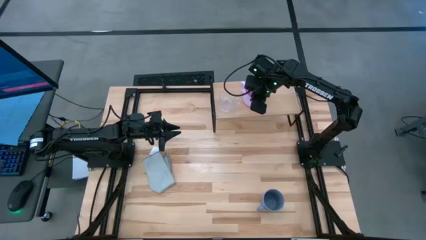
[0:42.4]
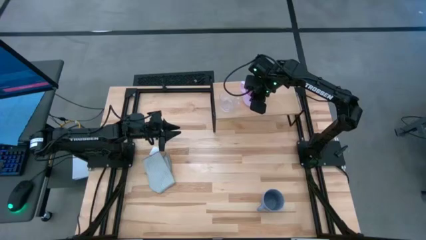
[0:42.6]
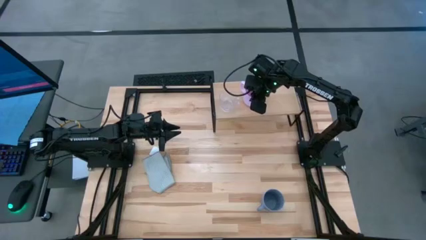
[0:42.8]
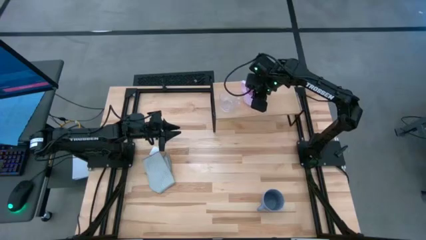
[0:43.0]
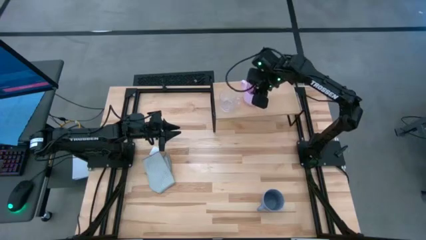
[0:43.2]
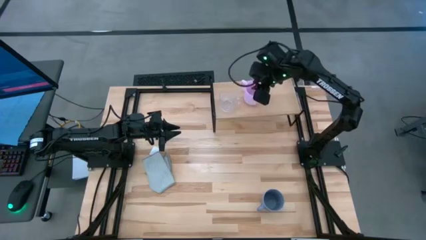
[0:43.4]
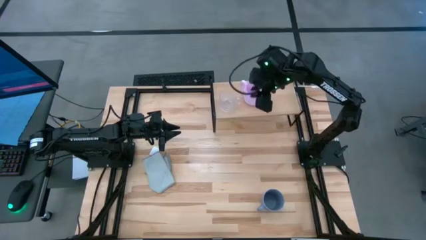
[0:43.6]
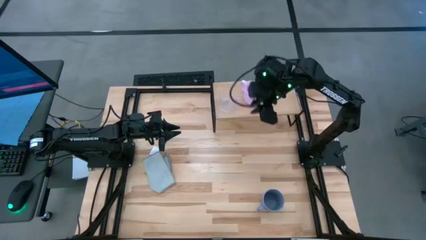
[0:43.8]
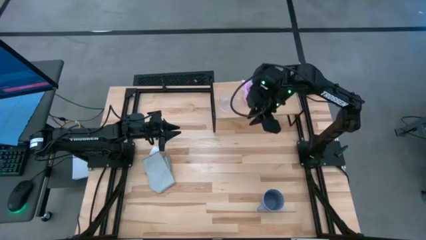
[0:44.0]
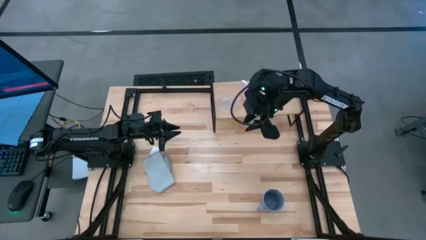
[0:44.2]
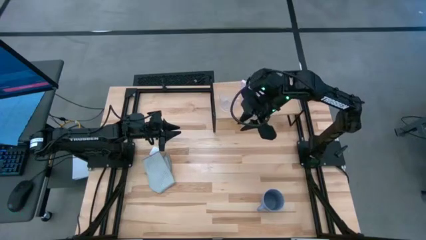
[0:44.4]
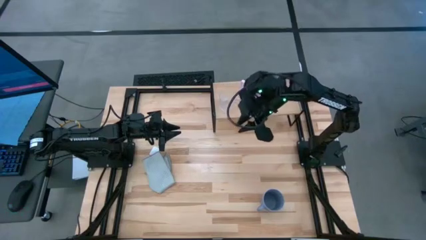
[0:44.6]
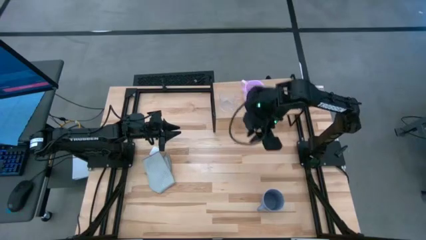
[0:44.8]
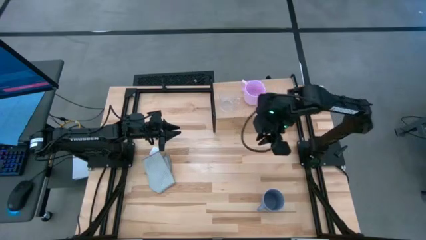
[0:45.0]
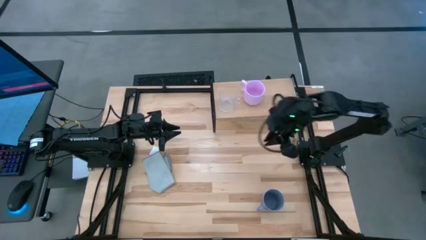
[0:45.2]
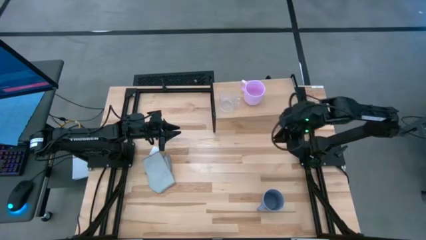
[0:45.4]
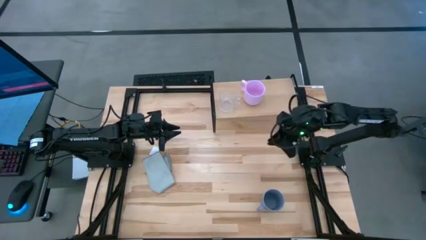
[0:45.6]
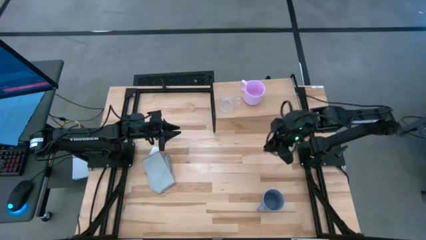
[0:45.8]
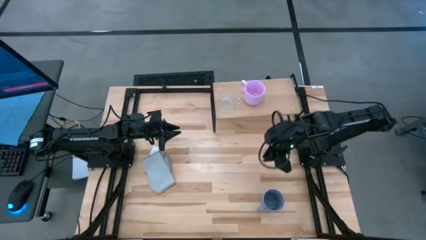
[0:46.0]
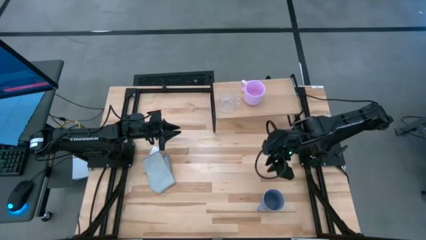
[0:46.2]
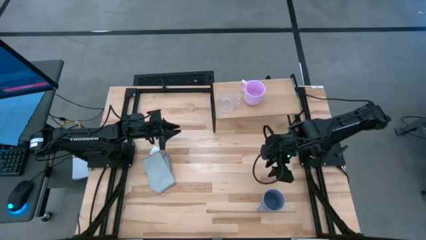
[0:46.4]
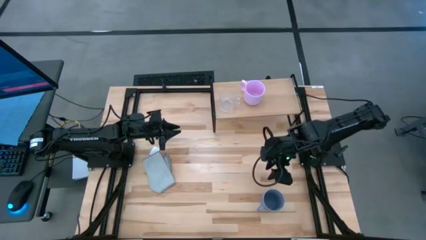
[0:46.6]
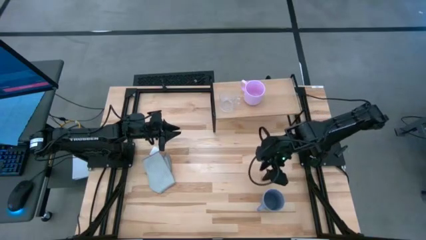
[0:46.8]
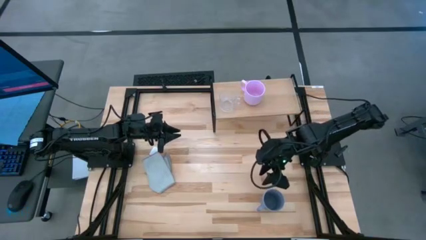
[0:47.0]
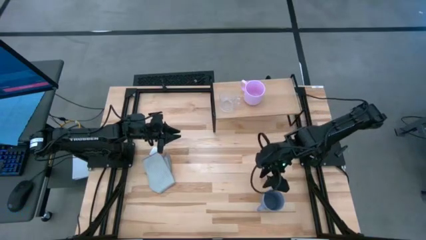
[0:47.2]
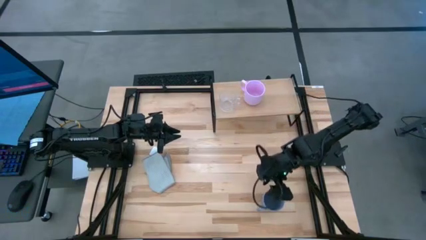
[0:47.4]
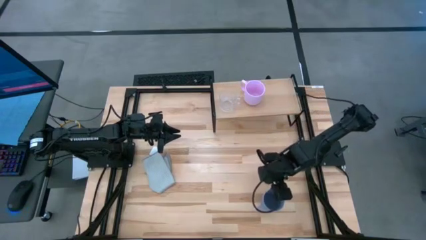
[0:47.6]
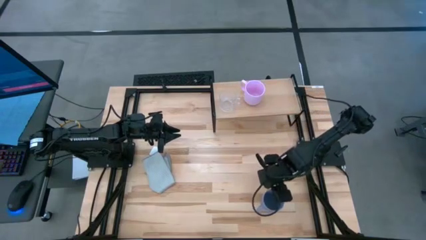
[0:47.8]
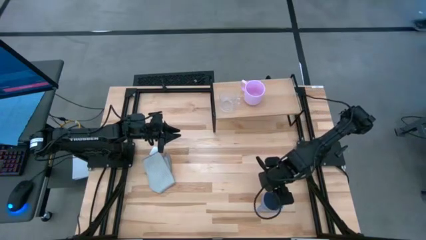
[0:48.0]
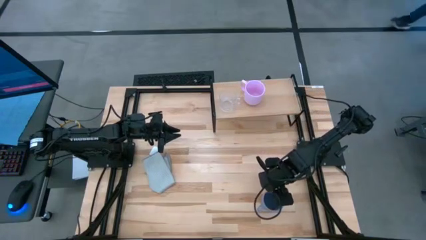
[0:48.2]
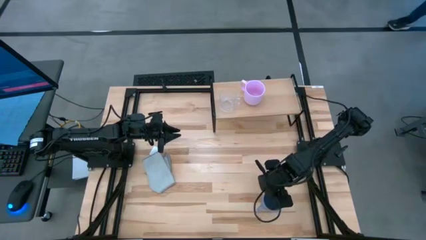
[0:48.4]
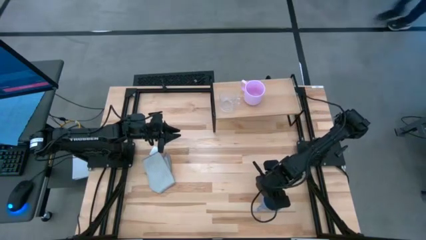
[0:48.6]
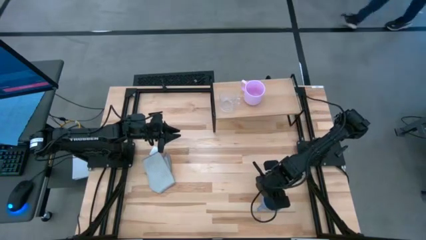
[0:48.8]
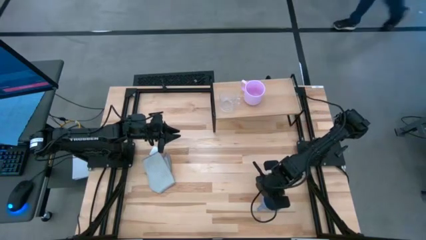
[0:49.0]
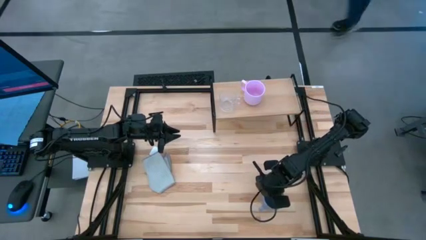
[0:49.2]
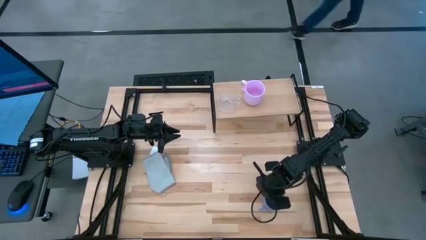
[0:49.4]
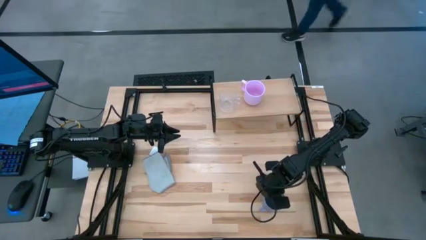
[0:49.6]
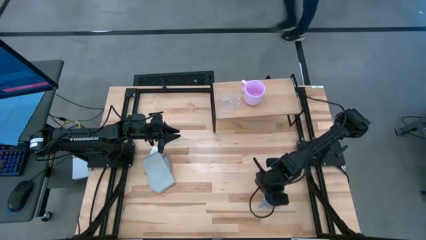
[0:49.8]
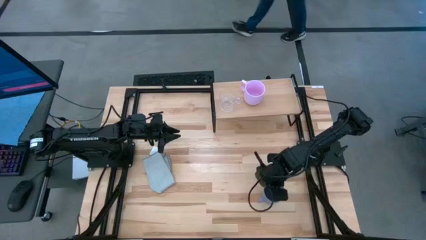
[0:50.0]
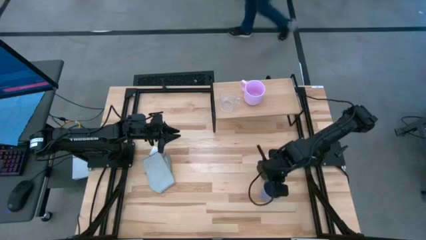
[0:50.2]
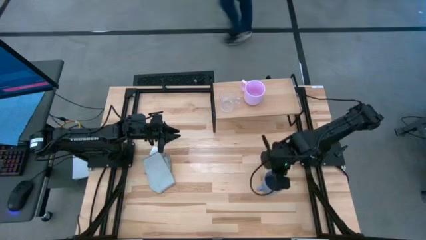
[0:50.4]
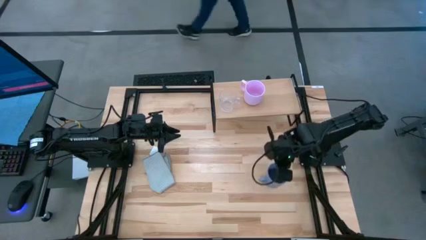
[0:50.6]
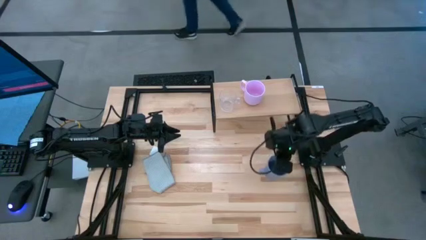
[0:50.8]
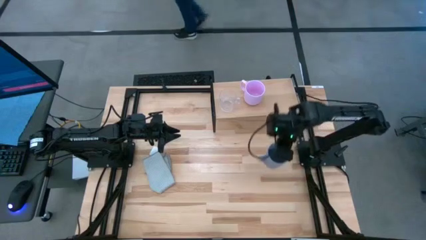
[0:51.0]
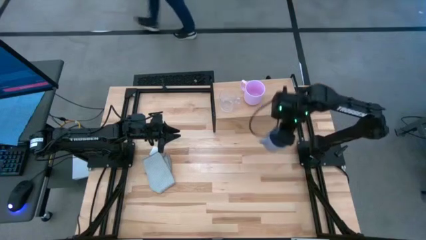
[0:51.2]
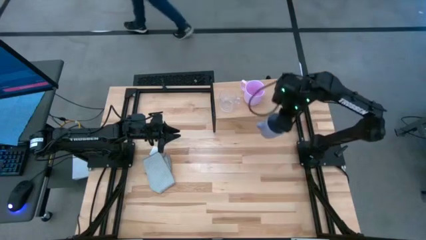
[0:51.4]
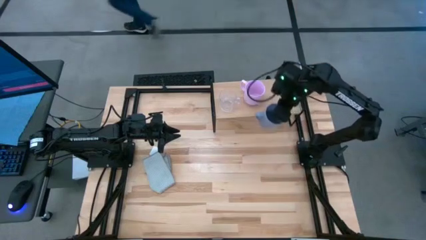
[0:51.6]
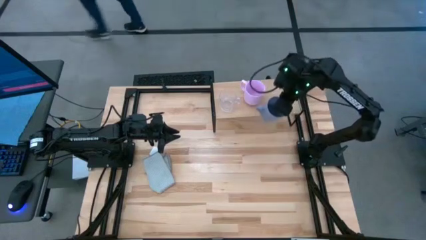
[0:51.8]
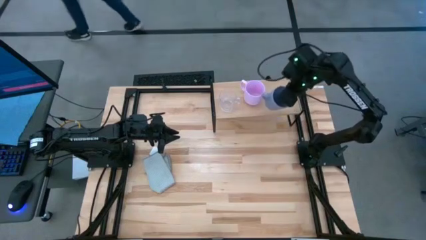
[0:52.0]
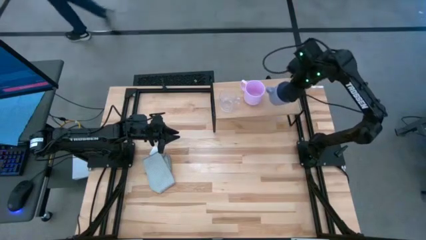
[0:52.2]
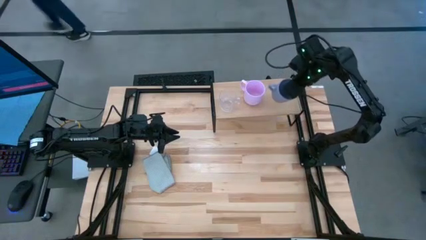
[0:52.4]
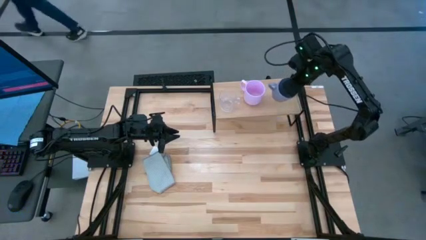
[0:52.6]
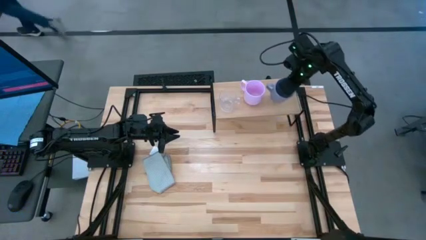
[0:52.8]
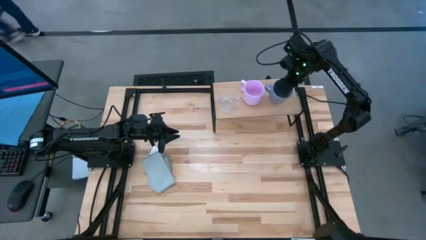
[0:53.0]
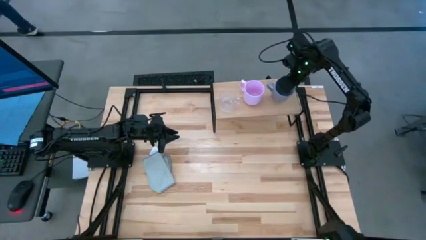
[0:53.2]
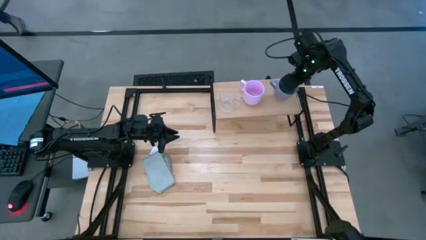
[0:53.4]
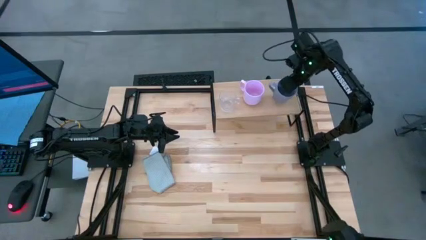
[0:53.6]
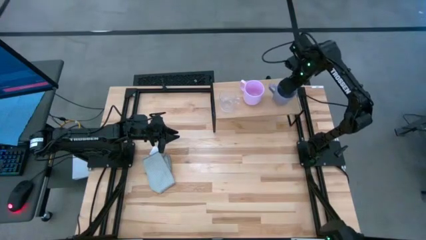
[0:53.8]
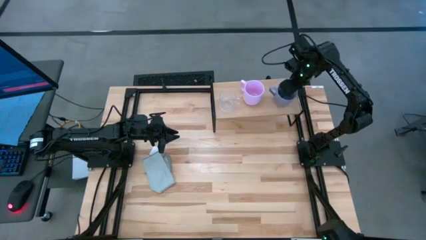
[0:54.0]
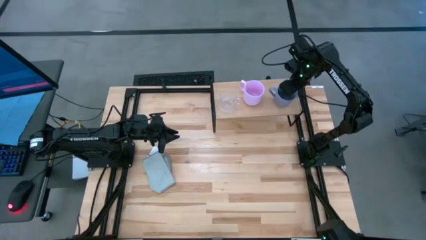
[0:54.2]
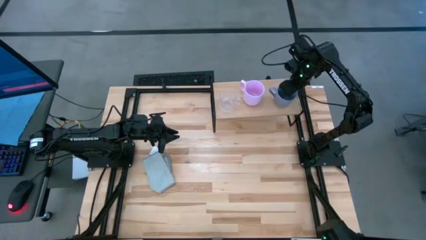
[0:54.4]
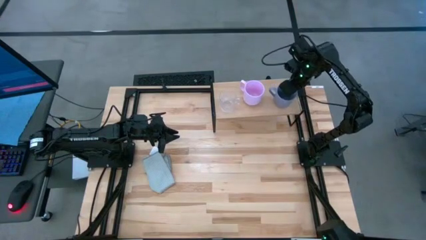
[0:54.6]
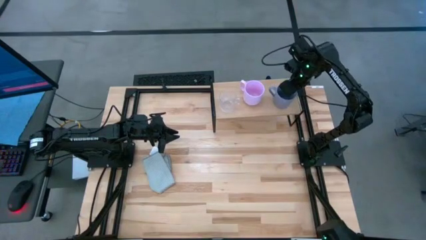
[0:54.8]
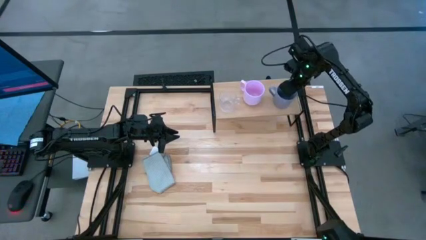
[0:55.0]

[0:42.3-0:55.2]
Task: Stack small to large cups/mugs on shelf
Put the blue mug on the shelf
